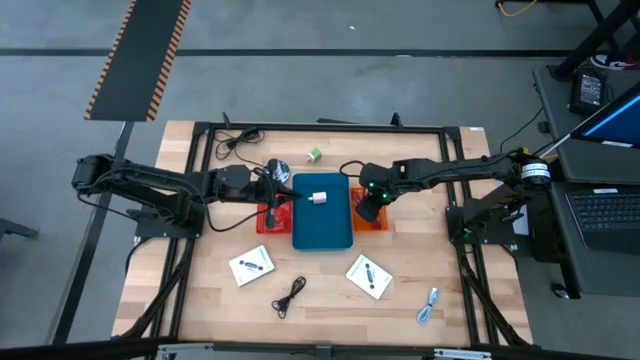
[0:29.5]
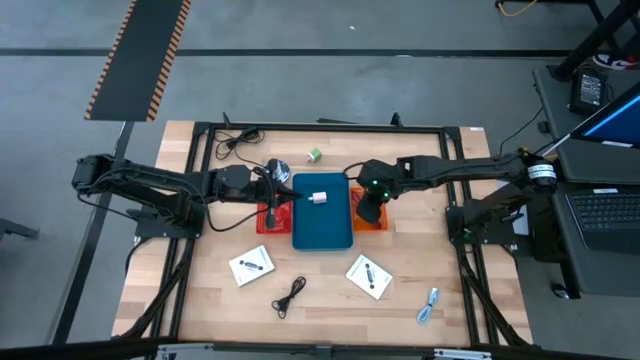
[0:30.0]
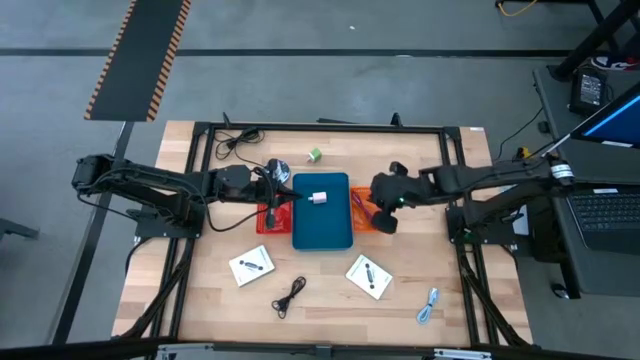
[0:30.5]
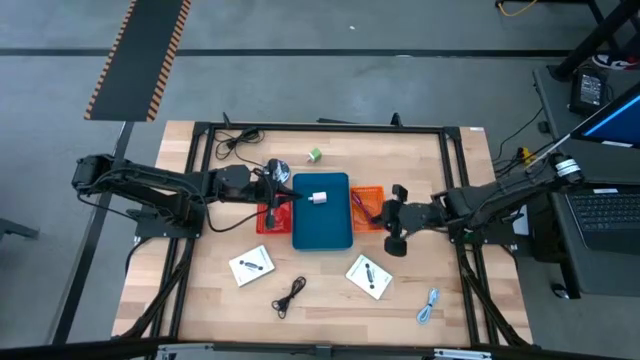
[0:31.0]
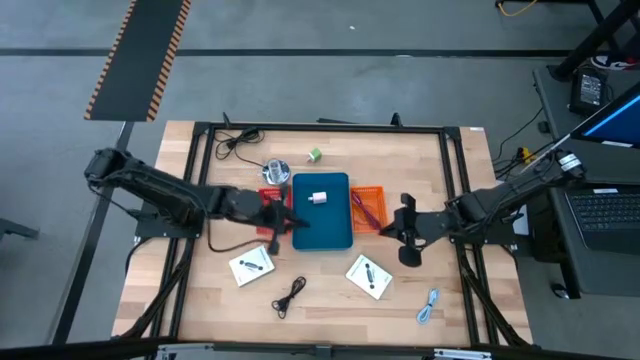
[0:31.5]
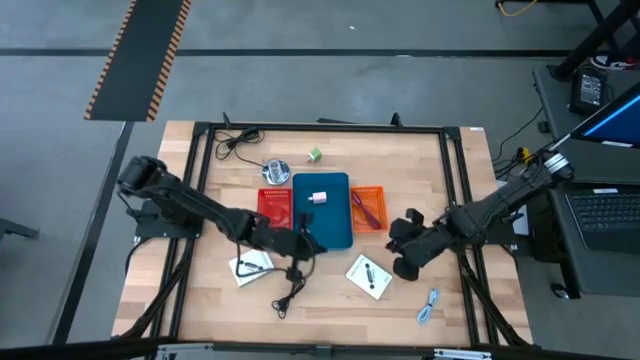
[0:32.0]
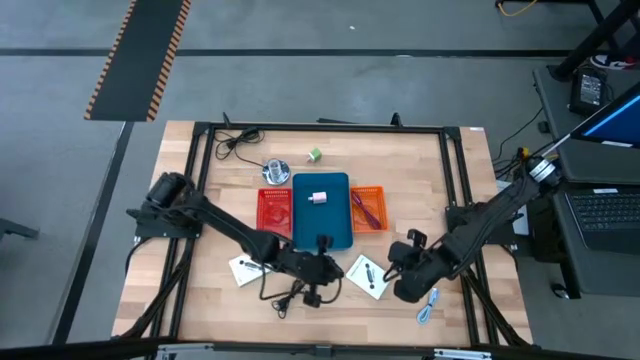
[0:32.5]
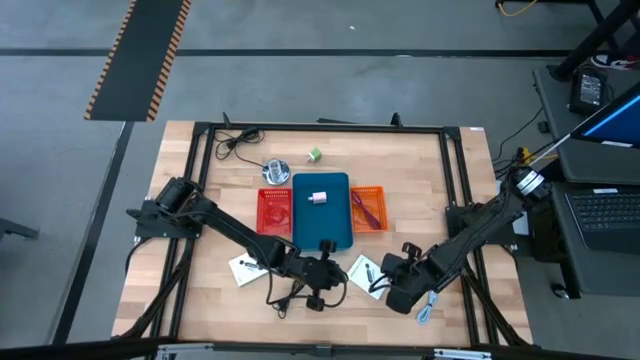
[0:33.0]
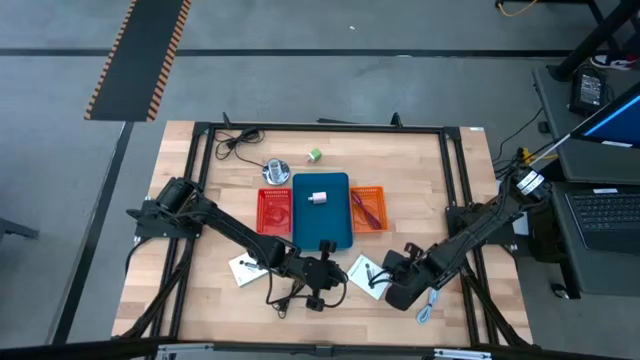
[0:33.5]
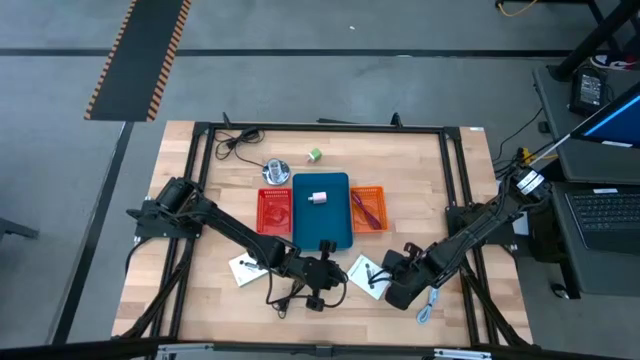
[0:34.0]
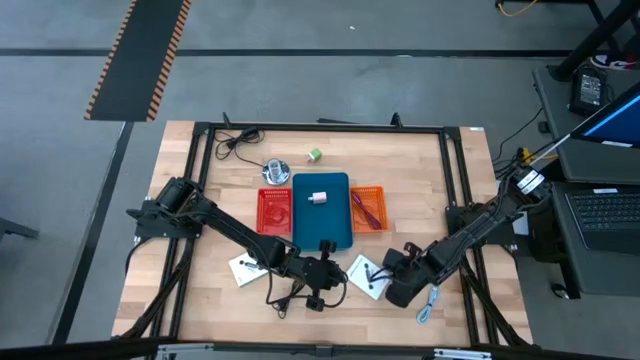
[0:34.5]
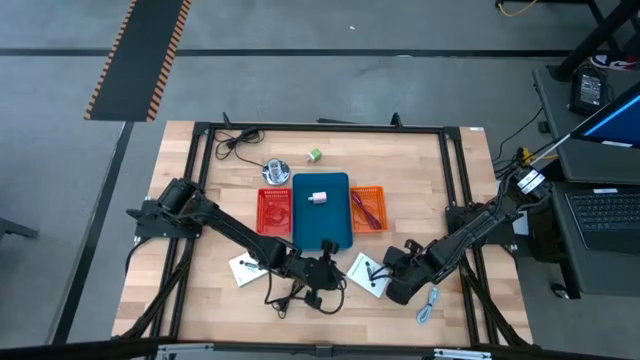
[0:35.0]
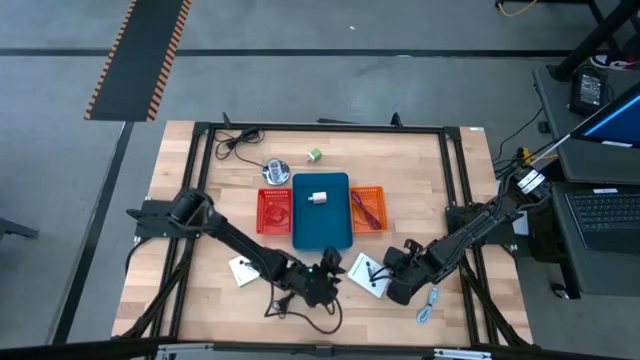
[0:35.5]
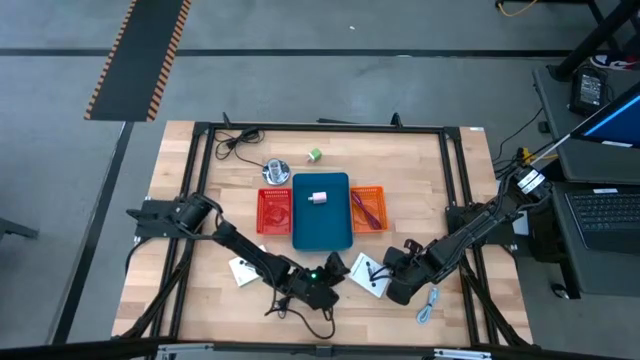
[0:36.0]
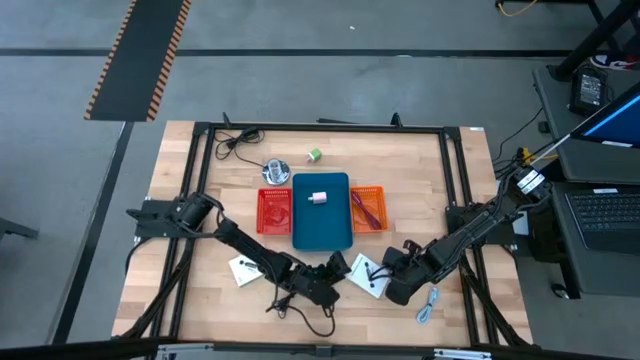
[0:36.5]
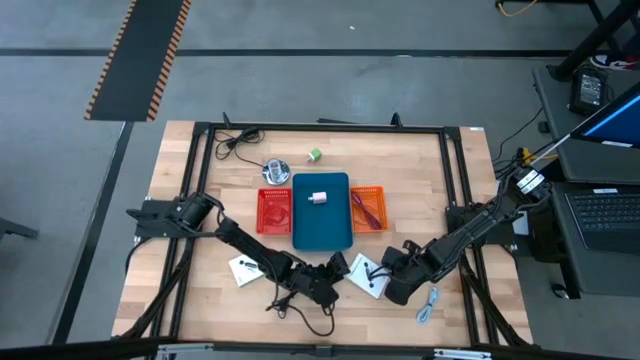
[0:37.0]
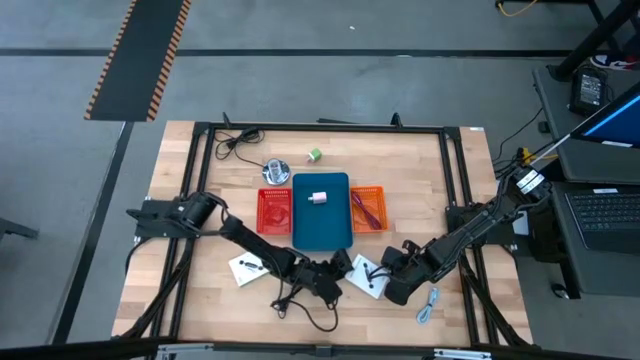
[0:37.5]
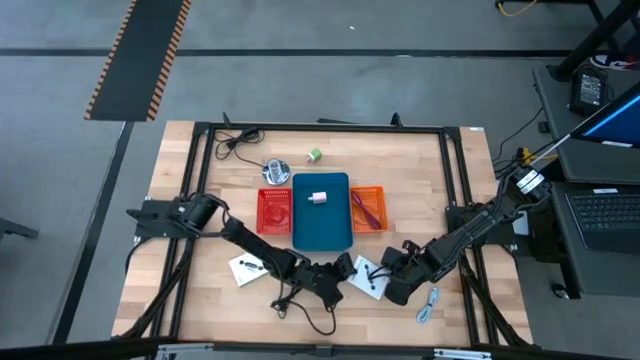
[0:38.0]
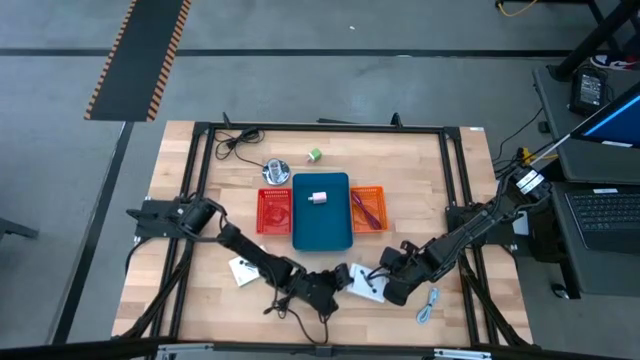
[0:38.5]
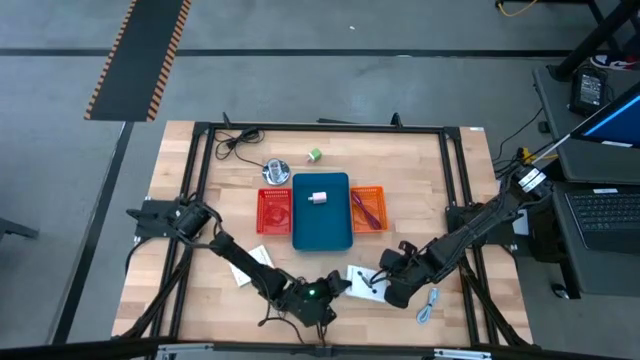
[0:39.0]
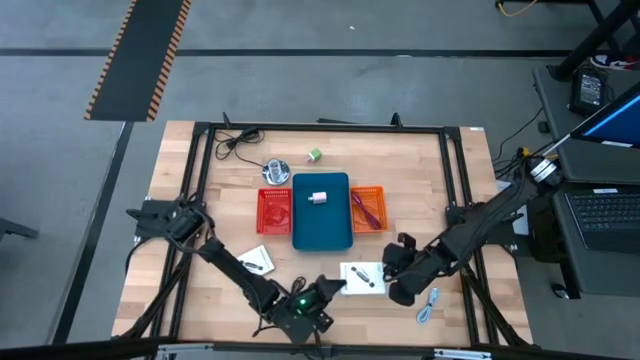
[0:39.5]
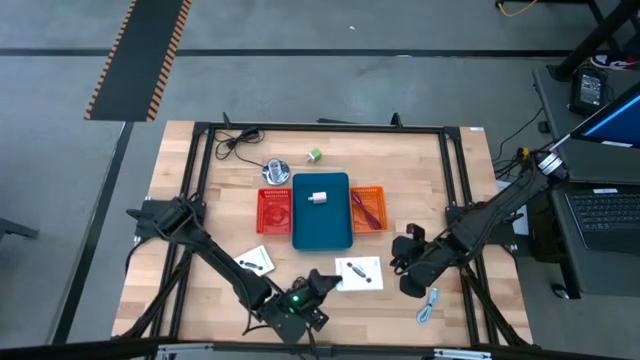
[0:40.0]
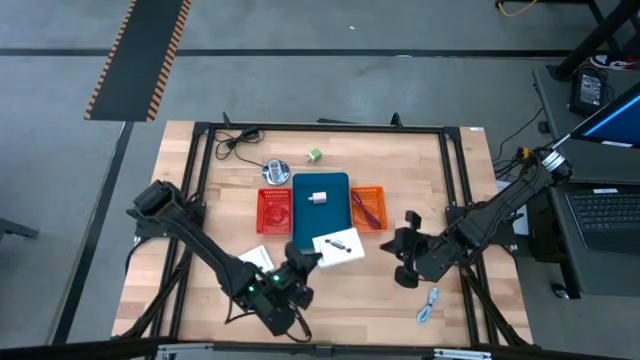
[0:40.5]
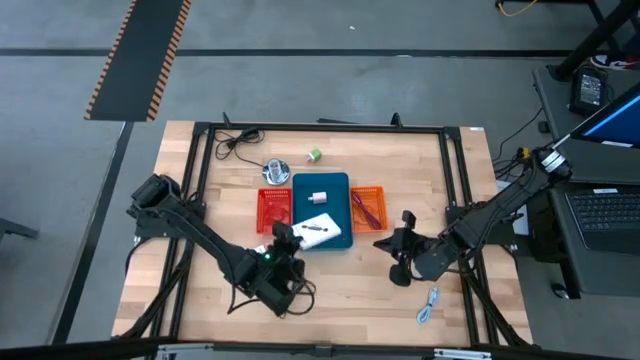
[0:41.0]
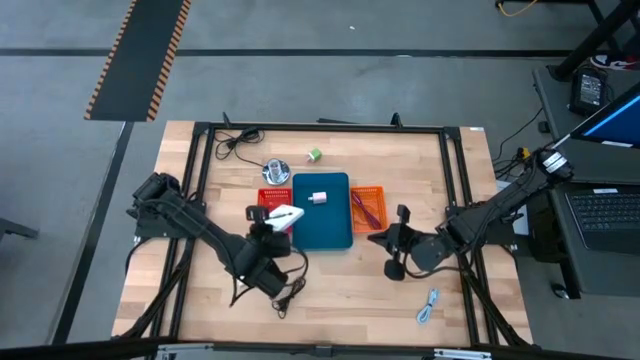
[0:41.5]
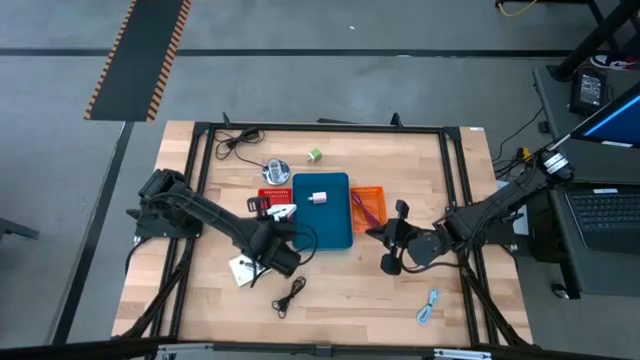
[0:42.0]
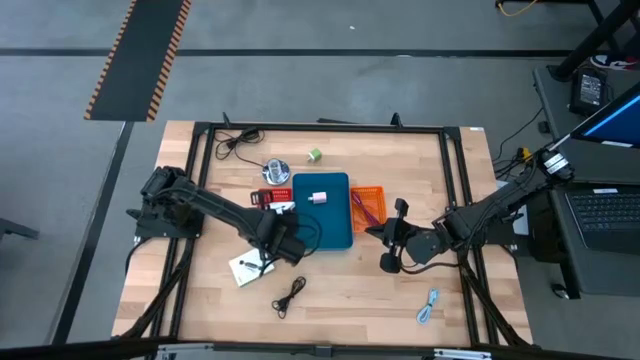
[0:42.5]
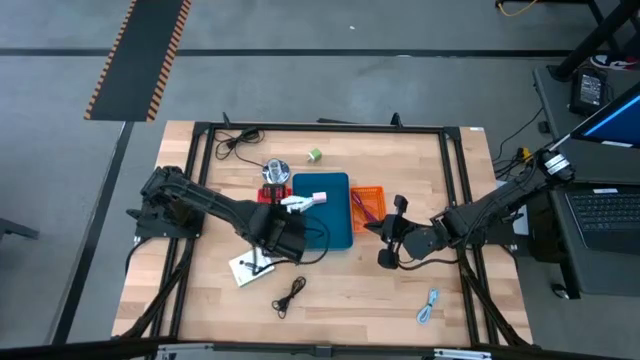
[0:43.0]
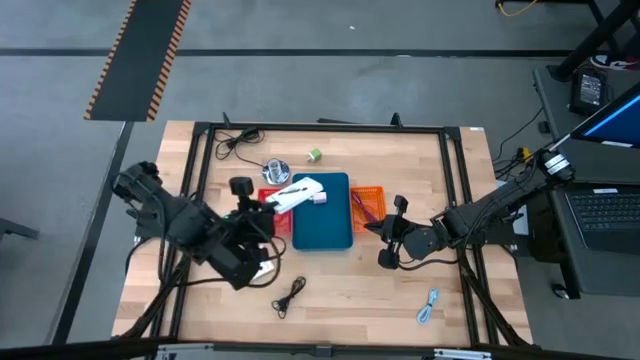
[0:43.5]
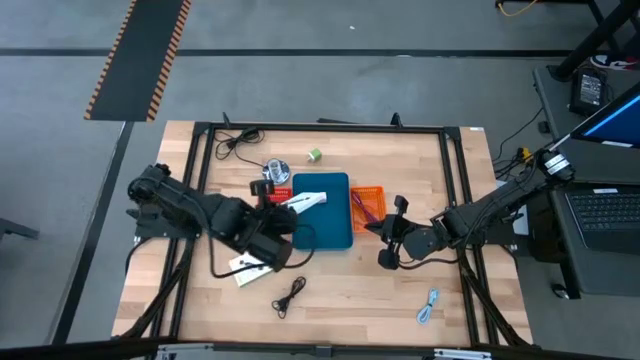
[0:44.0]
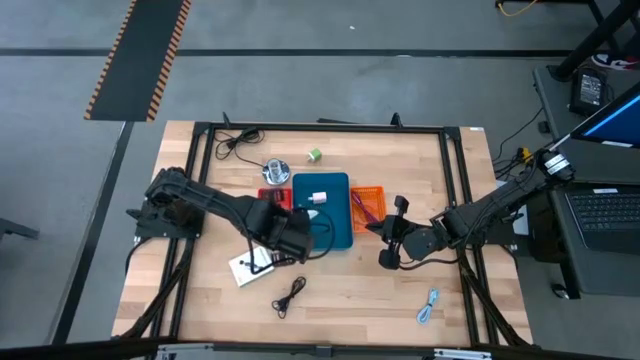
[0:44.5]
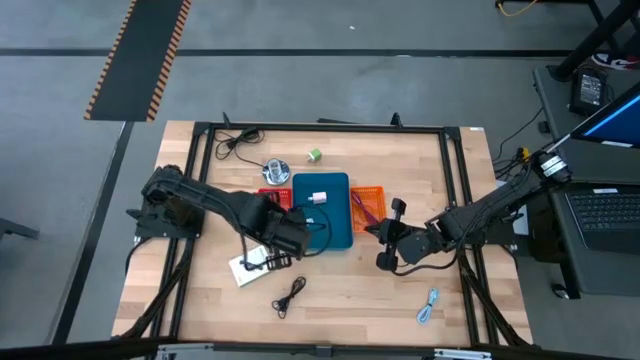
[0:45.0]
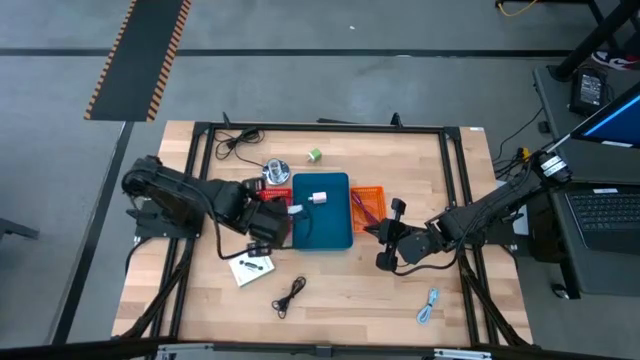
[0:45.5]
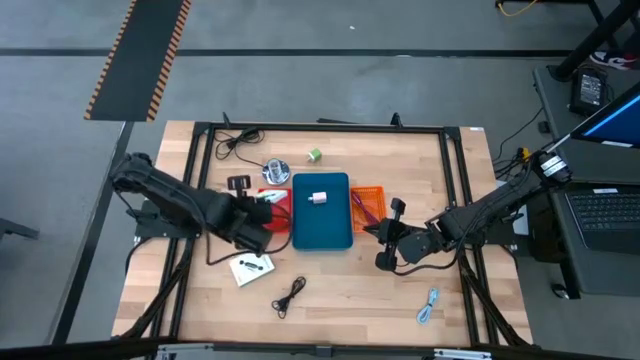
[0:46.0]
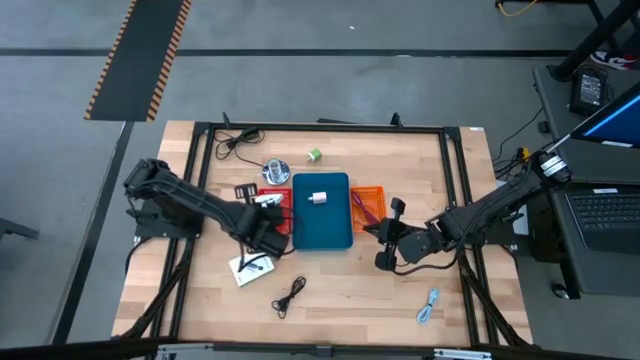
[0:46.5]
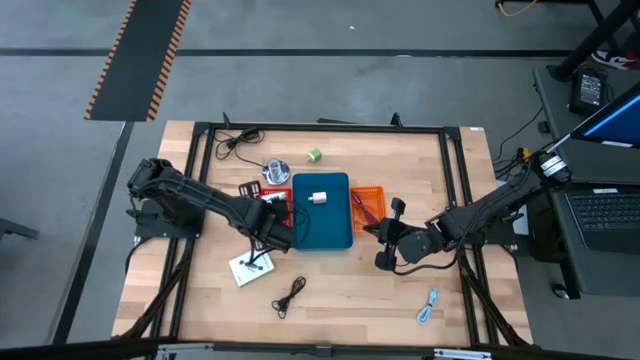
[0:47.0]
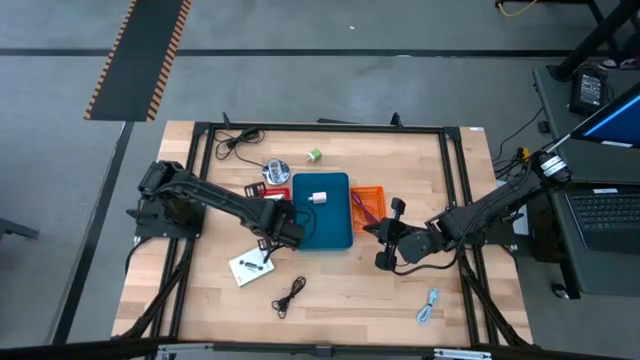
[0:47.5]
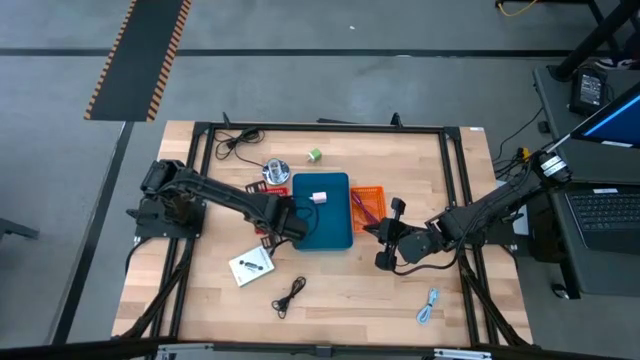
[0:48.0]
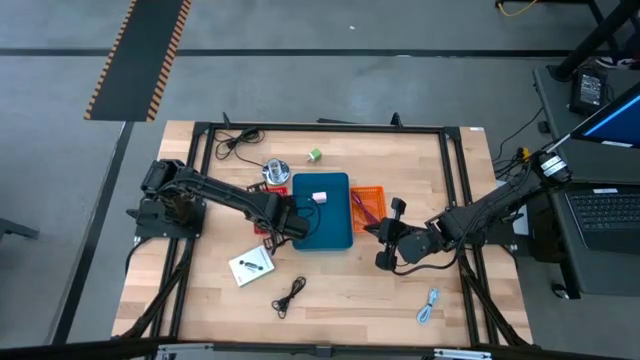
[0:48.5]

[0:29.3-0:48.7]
Task: Pick and place items into bin
Put the right card reader box into the red bin

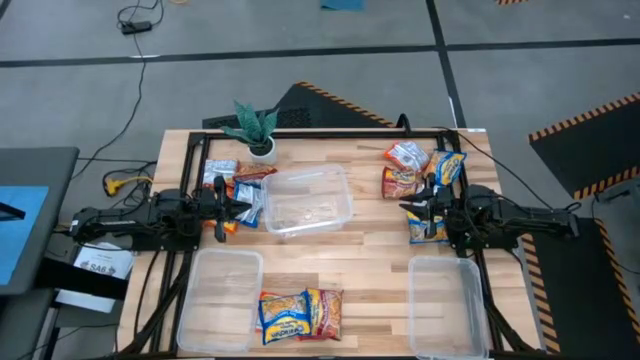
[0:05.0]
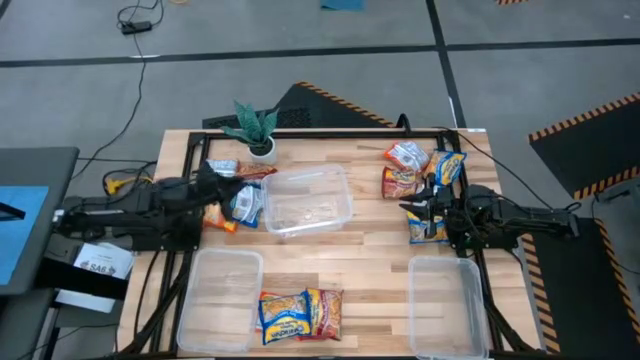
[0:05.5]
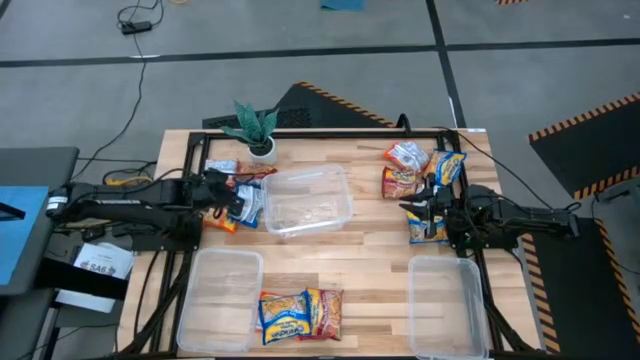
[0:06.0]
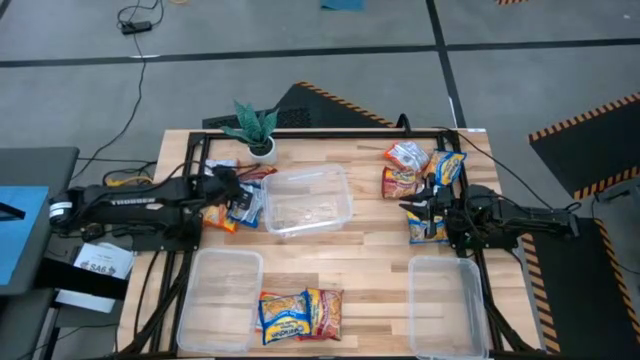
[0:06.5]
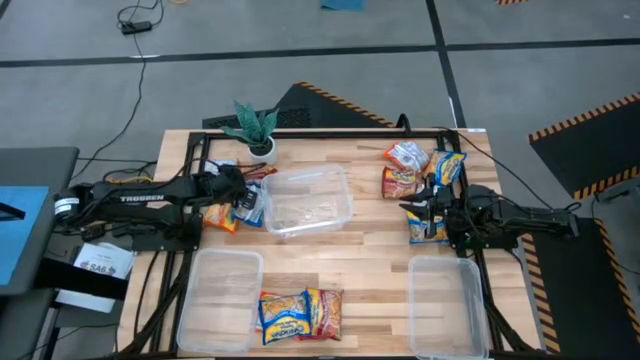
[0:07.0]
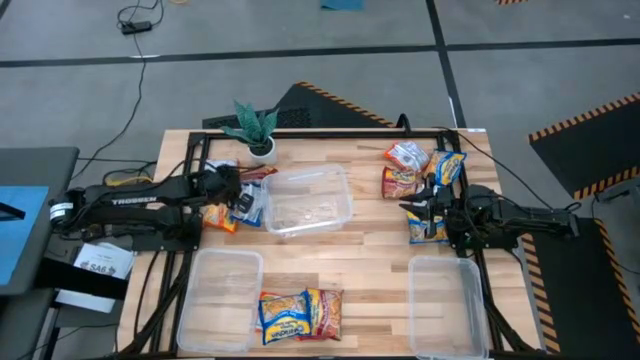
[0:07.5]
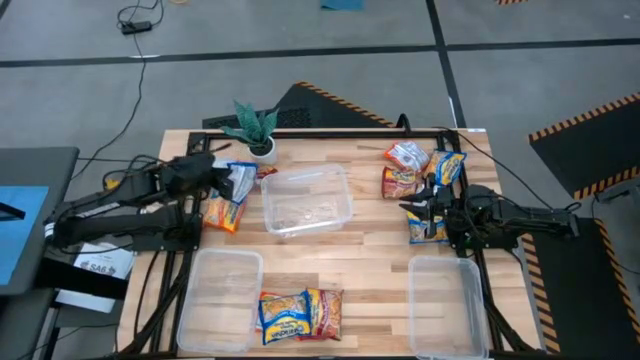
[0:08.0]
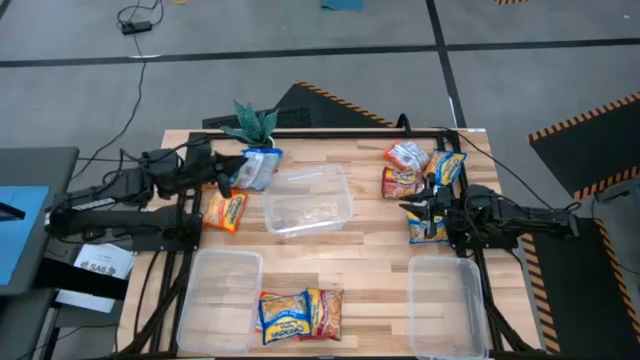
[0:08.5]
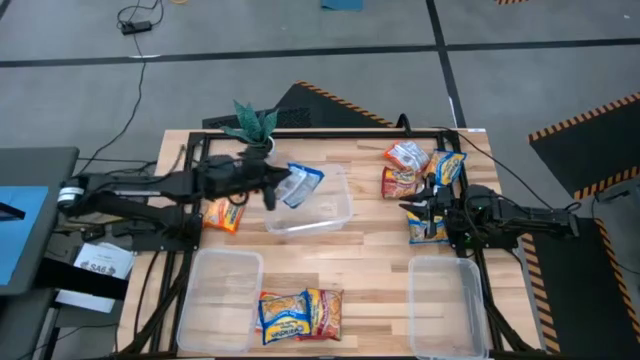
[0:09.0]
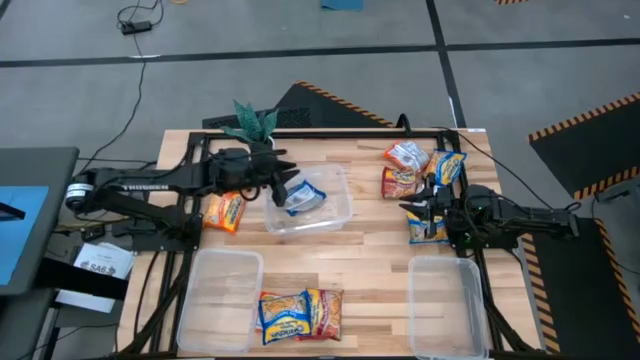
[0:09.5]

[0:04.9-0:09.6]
Task: Sort Maruchan noodles
Put the blue noodle packet into the top transparent bin
